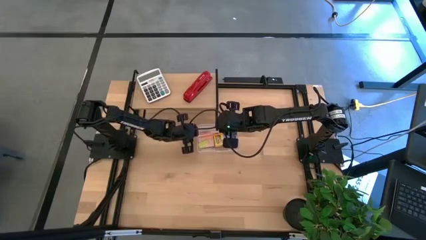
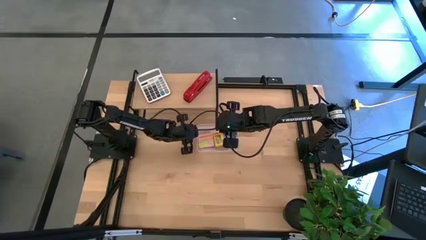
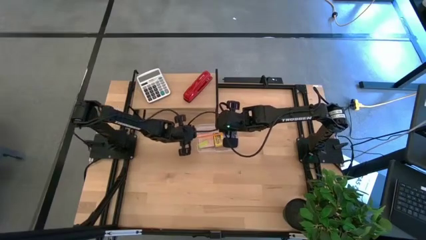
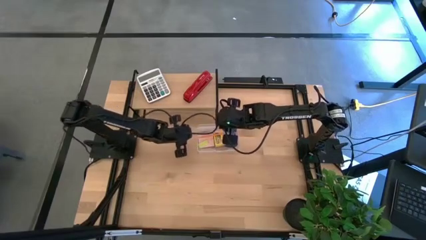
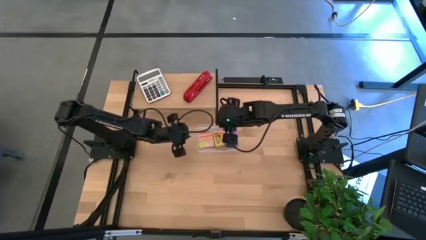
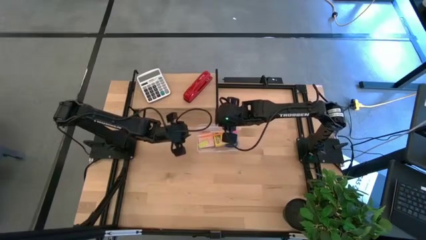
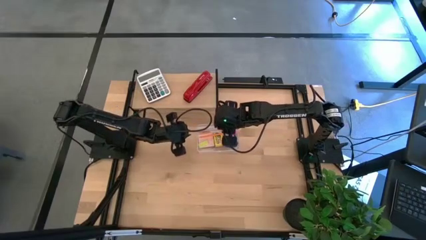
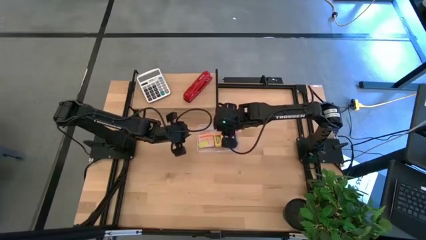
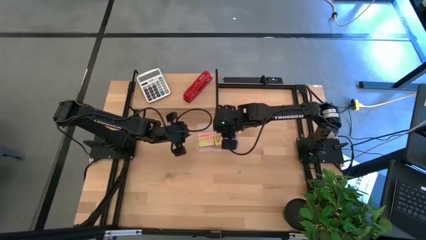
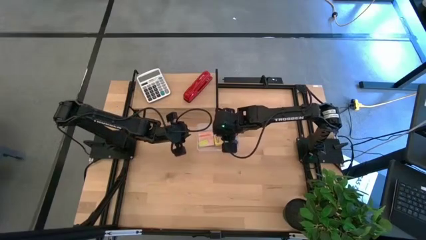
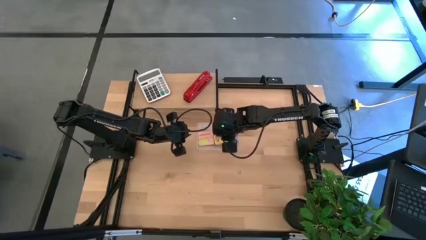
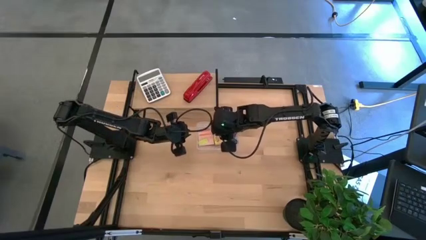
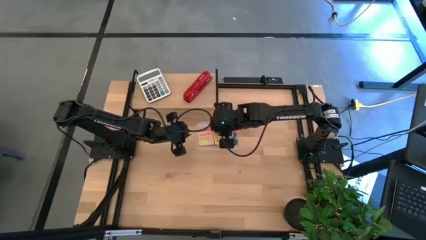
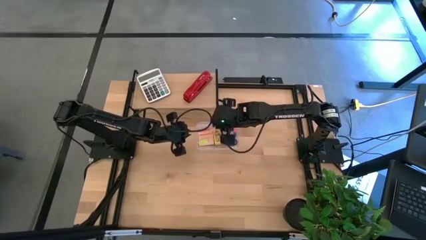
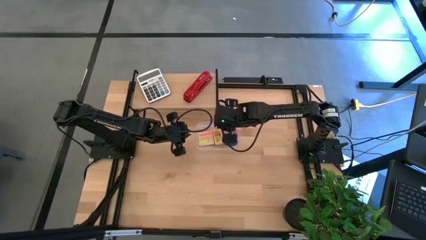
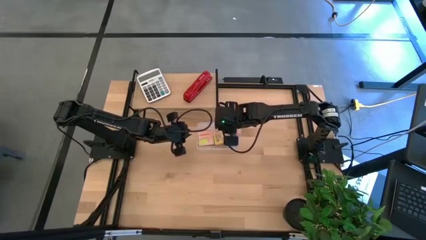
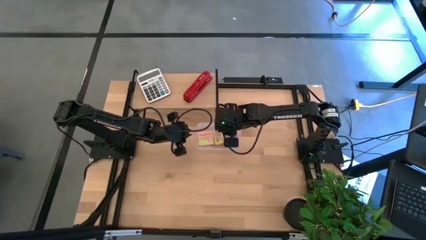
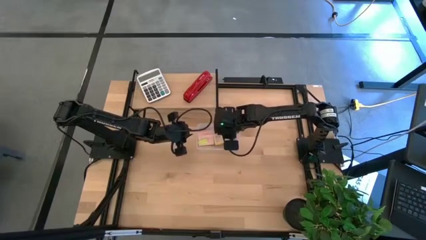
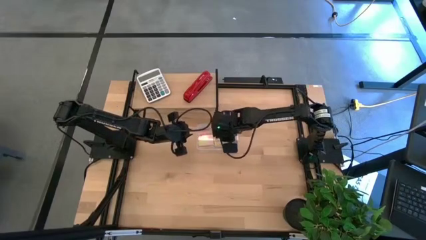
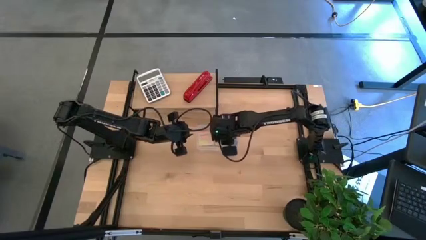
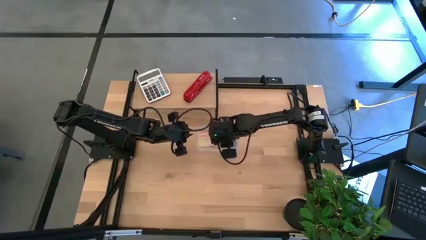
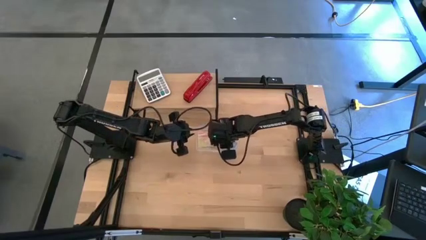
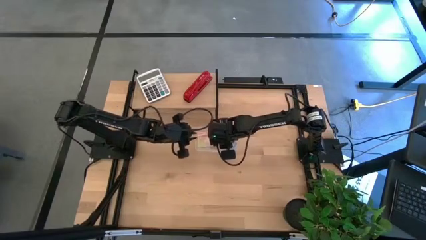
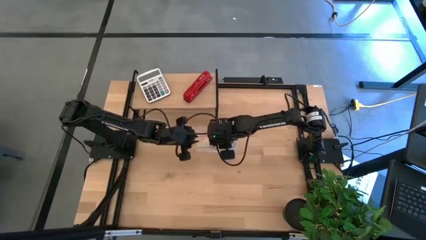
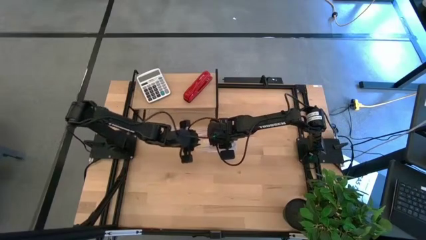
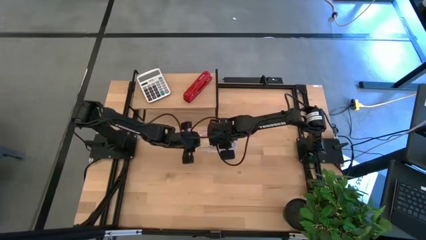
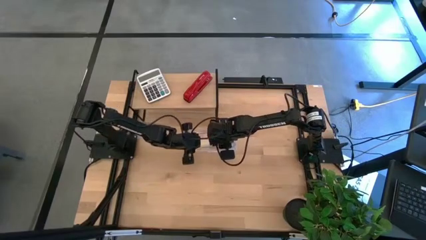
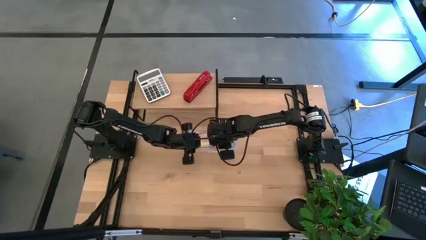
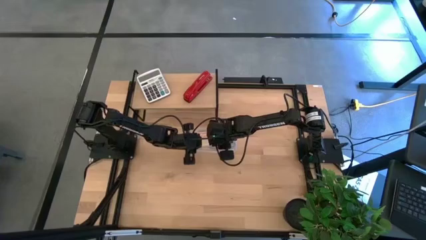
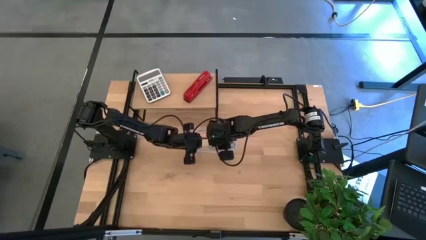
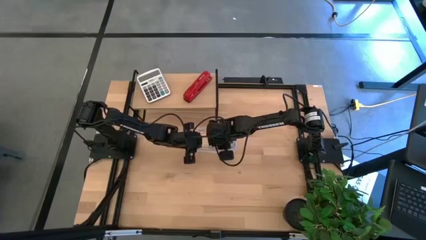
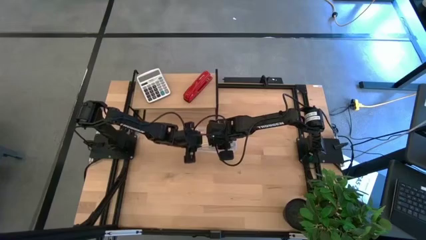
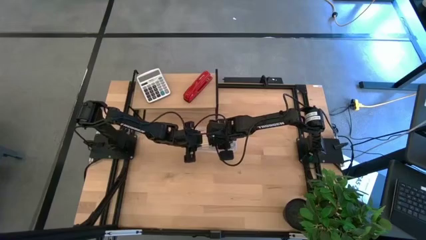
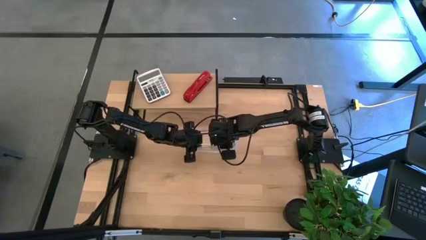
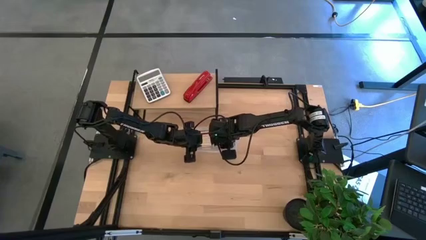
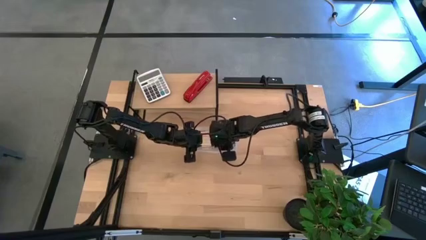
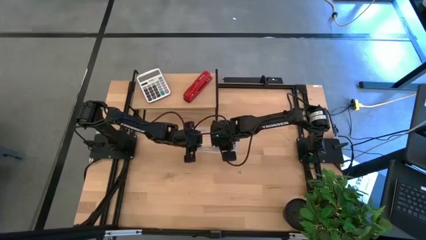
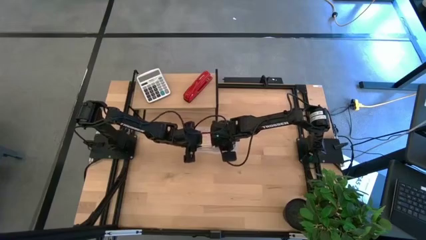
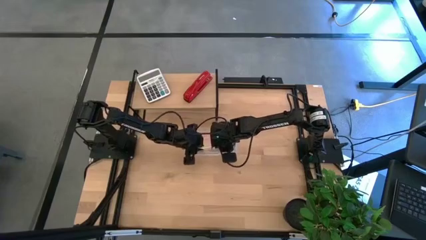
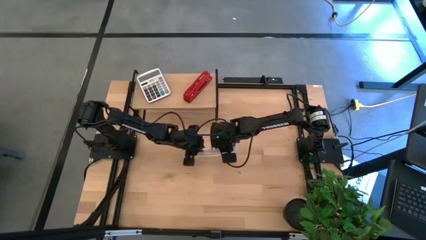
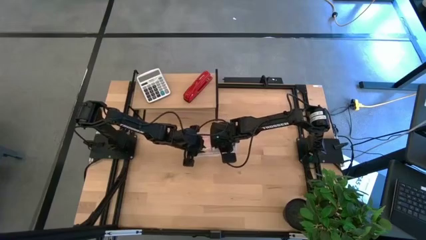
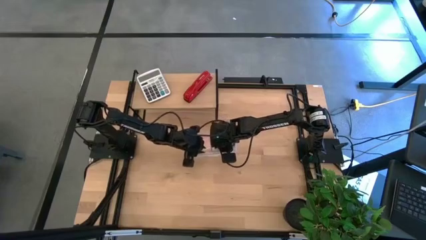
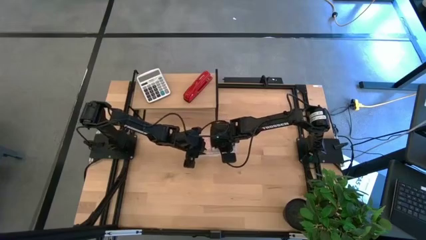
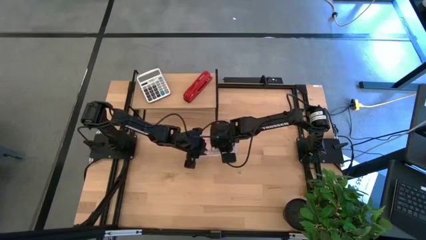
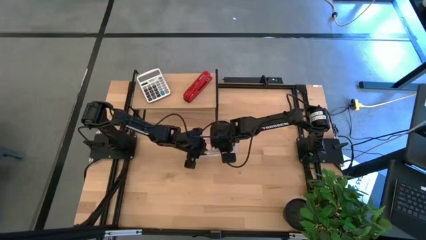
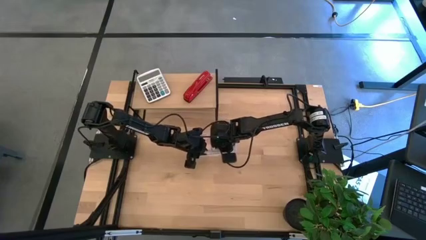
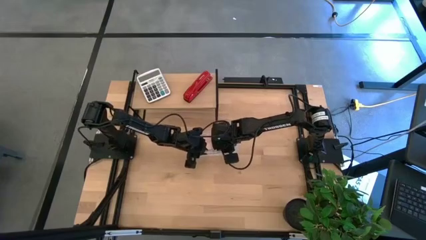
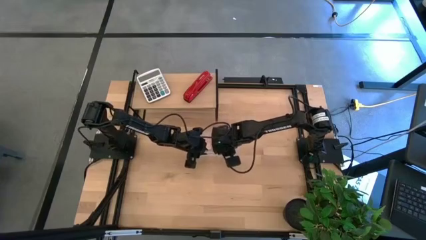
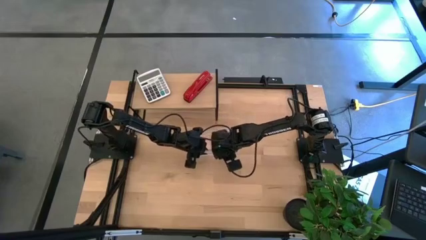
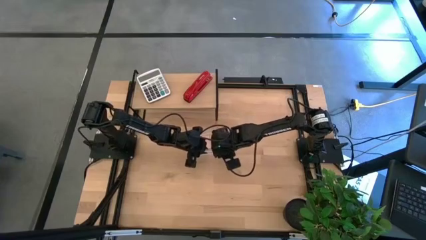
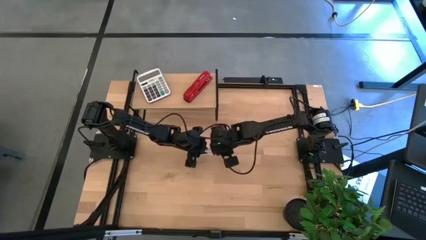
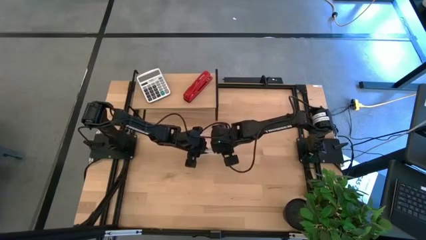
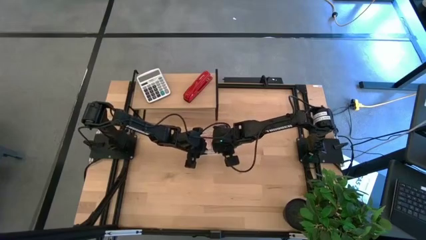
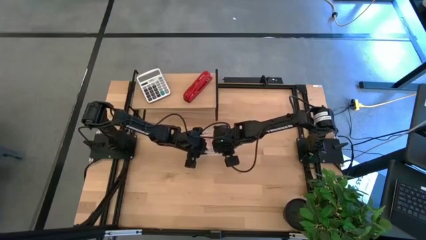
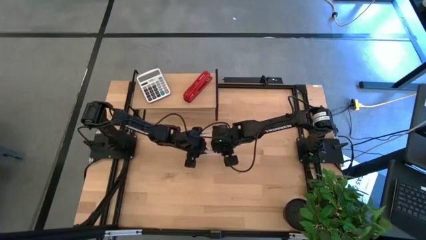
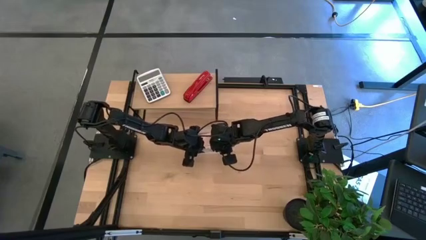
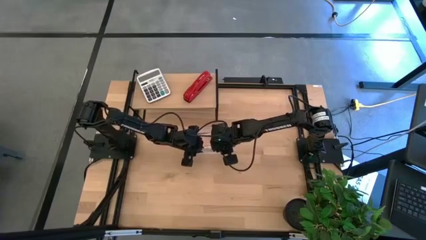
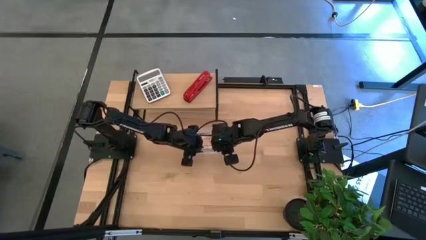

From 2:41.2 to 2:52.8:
Task: Pack school essentials
Close the supply box

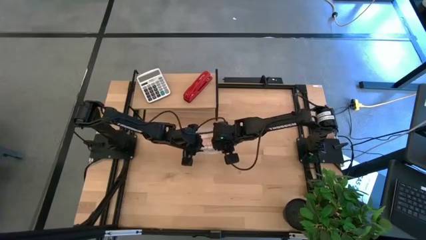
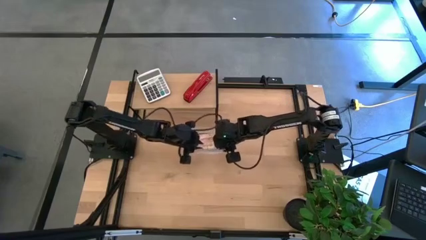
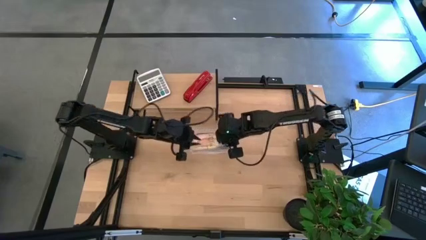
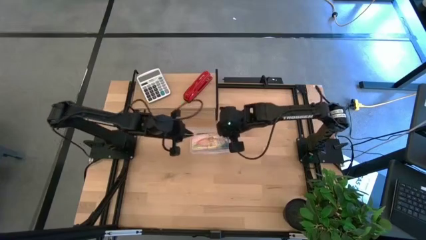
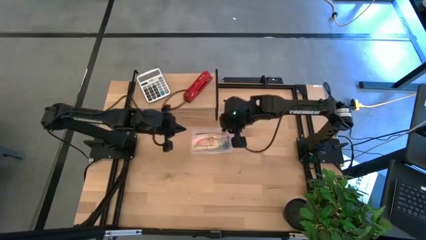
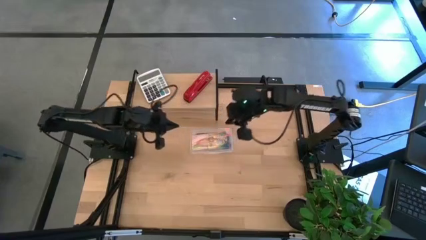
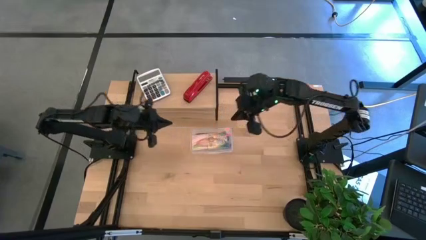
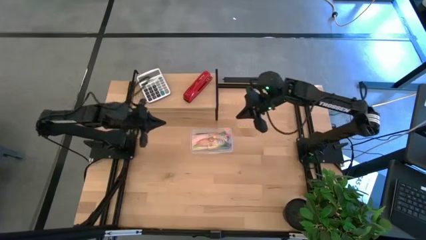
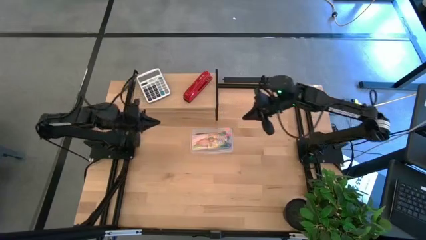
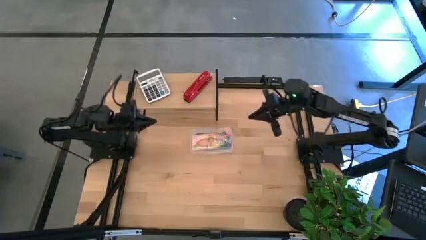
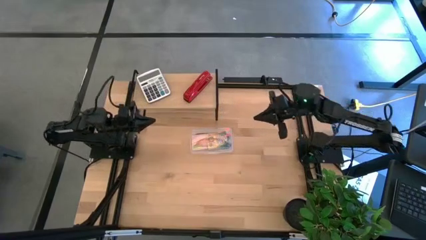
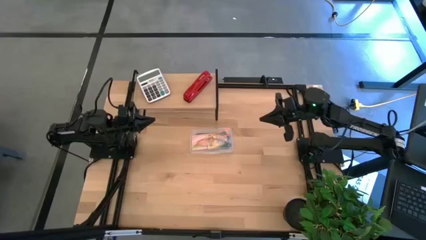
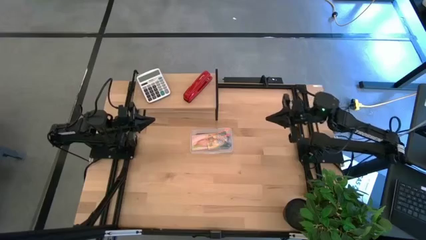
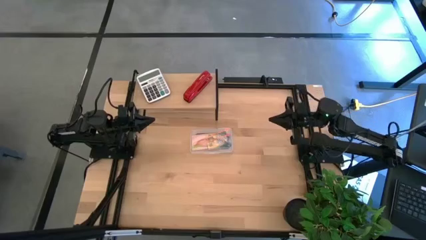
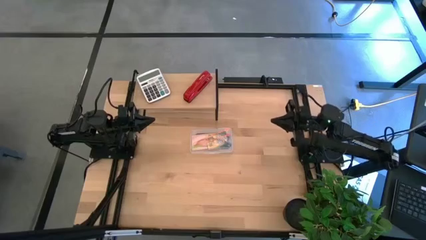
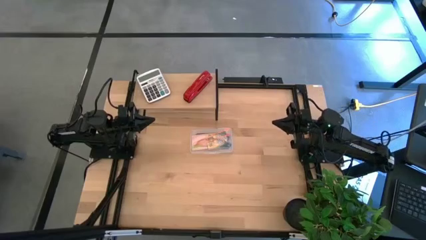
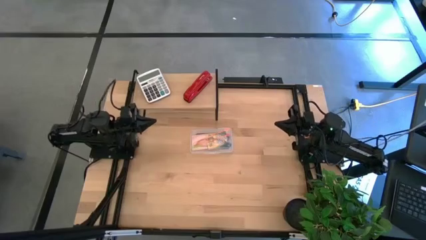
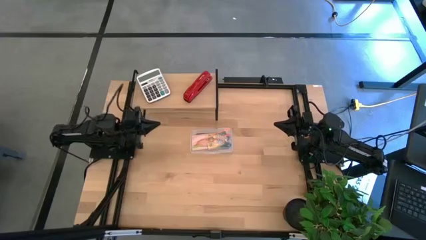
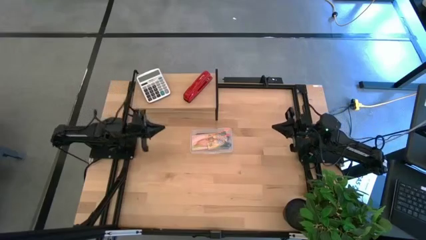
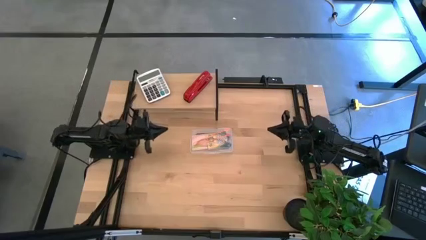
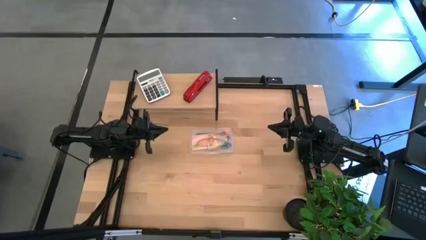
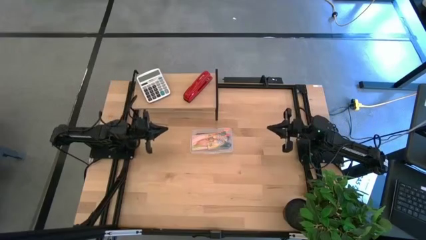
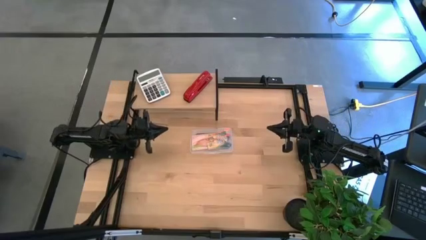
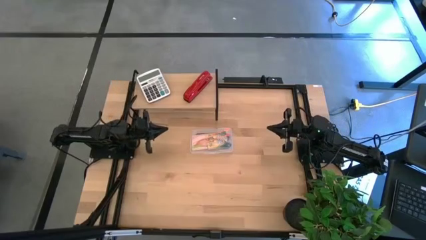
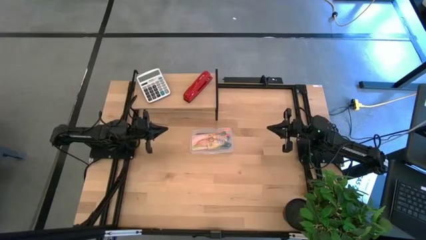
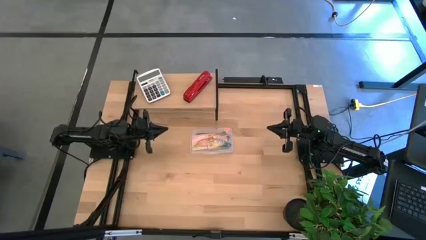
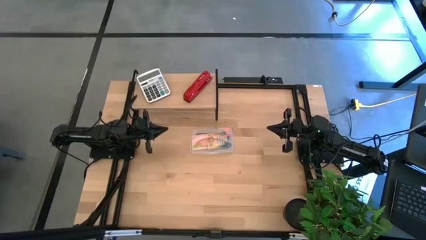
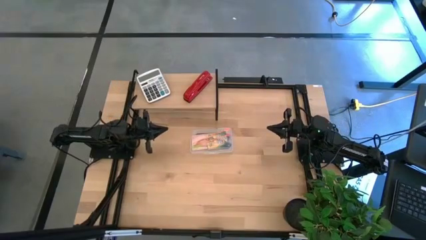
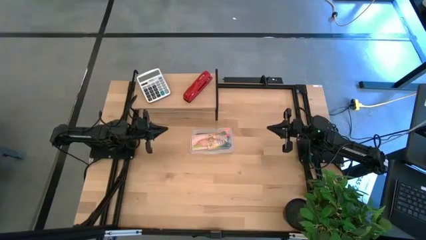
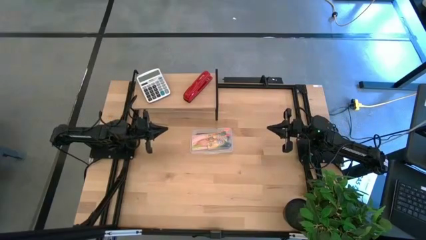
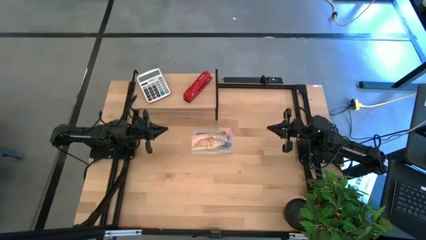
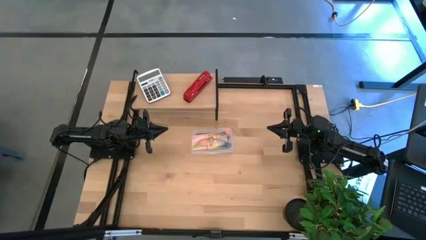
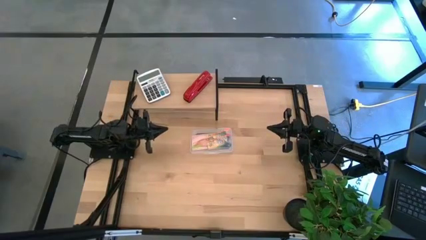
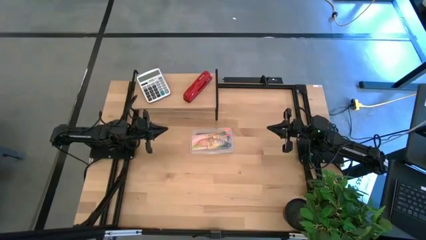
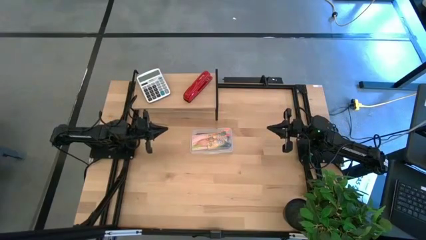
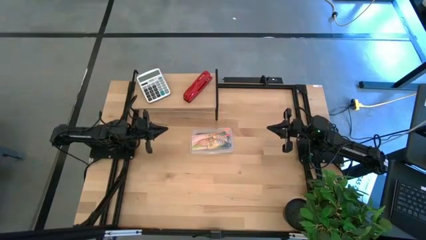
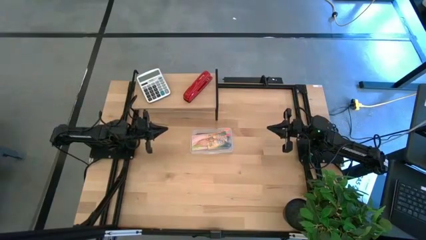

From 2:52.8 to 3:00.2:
Return to Home Position
